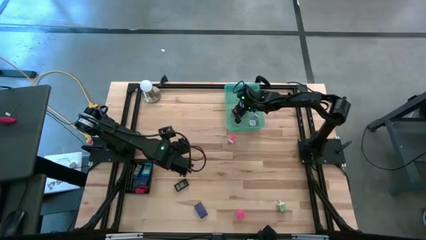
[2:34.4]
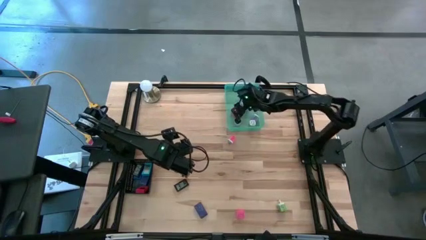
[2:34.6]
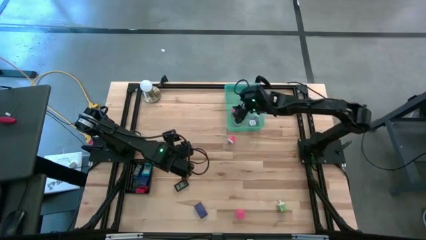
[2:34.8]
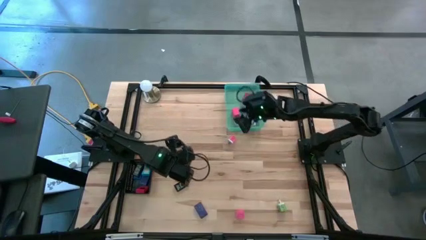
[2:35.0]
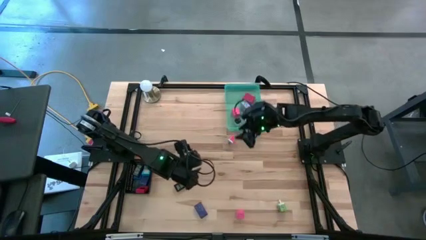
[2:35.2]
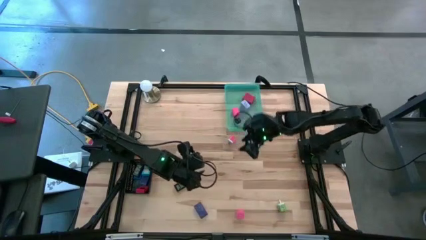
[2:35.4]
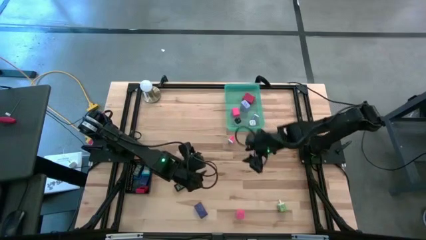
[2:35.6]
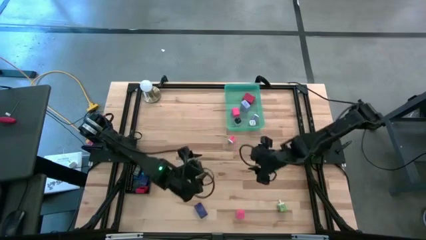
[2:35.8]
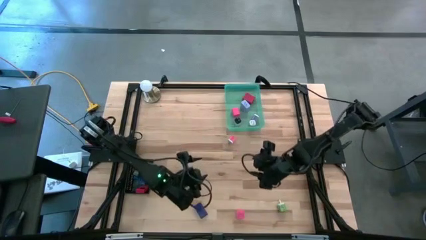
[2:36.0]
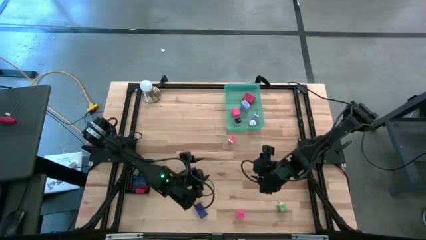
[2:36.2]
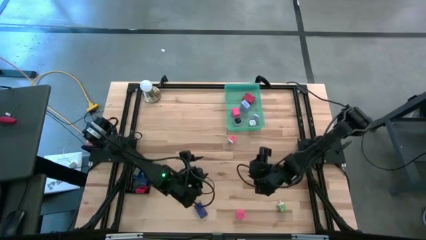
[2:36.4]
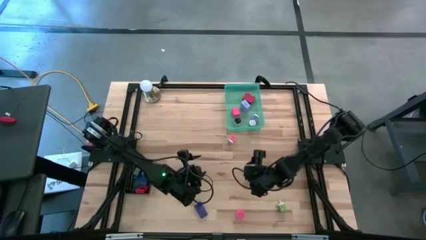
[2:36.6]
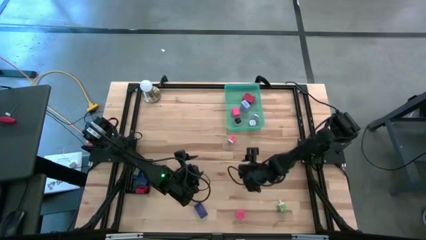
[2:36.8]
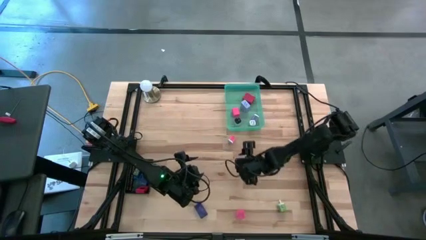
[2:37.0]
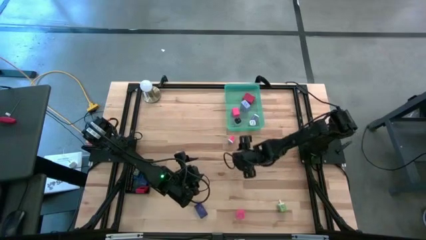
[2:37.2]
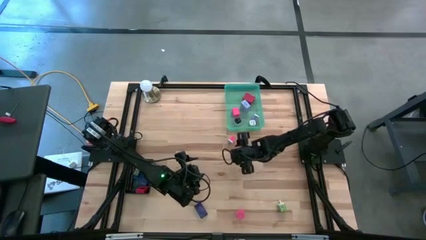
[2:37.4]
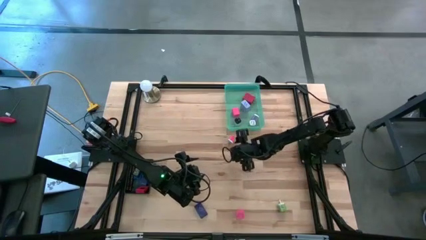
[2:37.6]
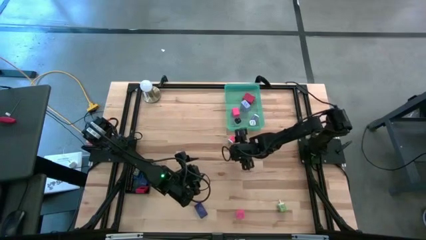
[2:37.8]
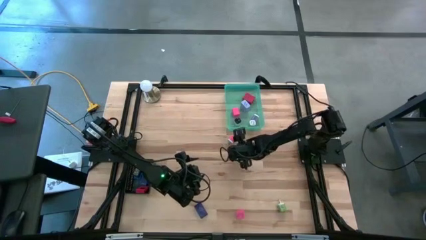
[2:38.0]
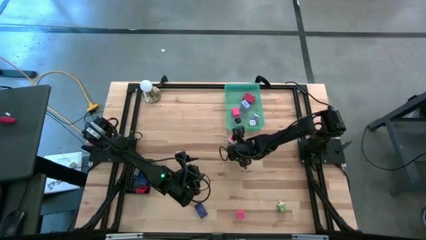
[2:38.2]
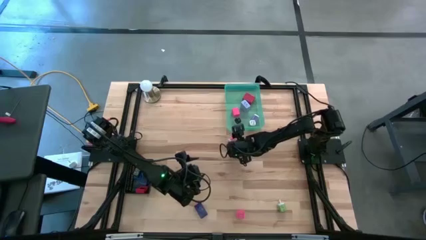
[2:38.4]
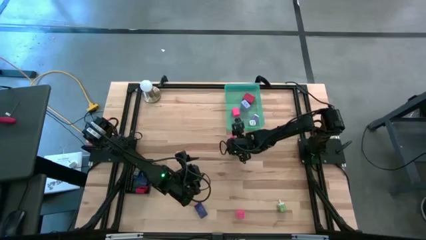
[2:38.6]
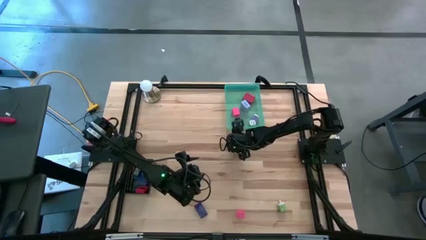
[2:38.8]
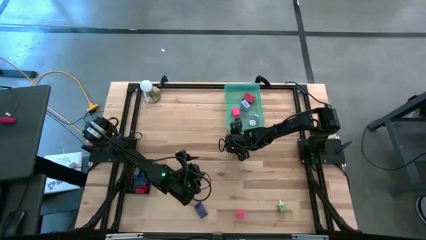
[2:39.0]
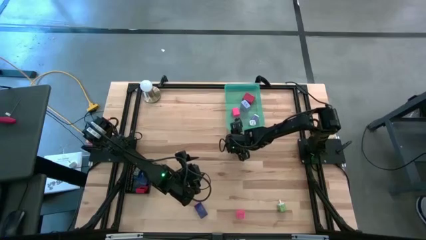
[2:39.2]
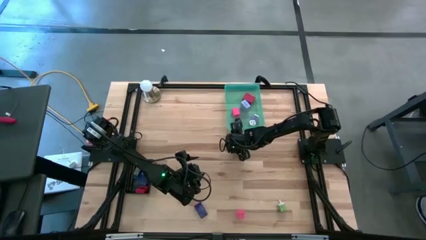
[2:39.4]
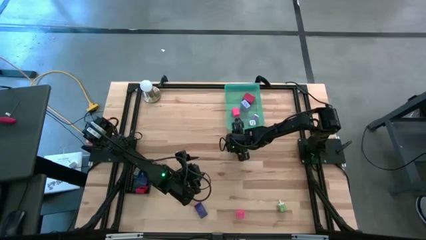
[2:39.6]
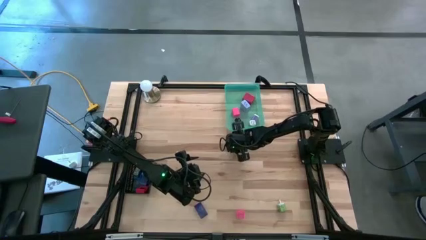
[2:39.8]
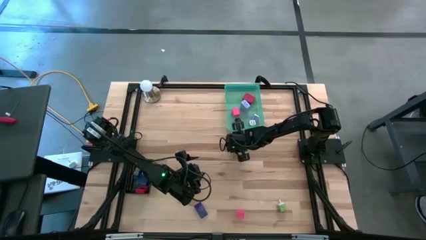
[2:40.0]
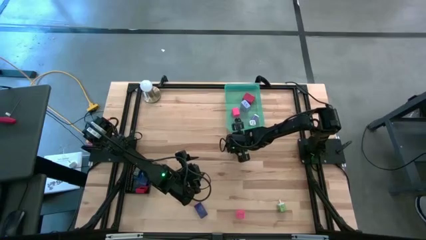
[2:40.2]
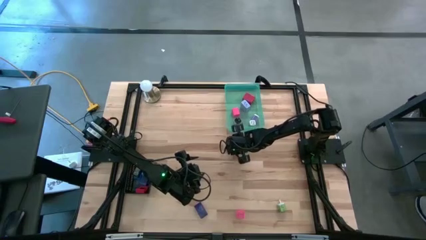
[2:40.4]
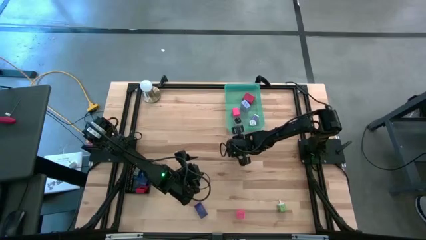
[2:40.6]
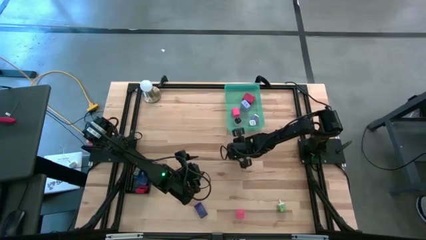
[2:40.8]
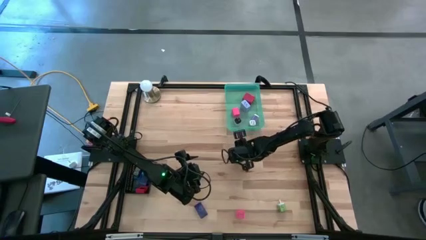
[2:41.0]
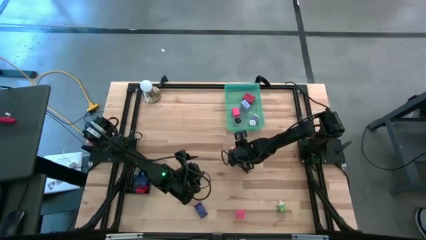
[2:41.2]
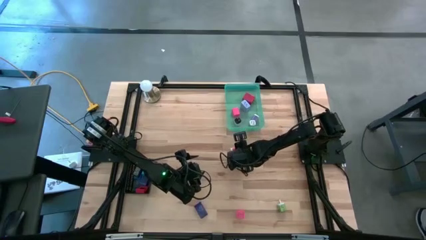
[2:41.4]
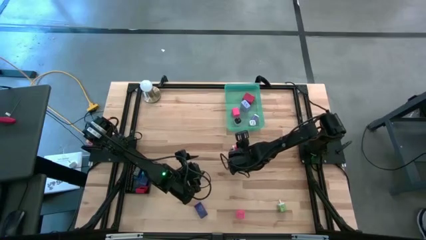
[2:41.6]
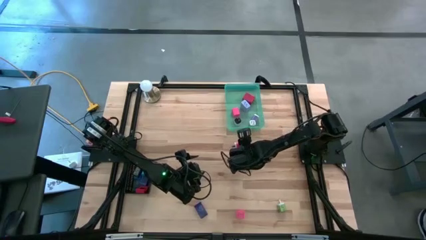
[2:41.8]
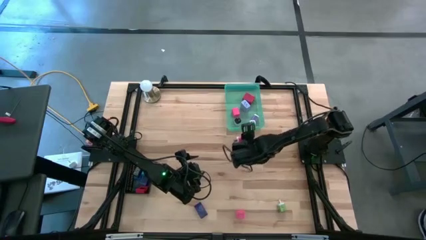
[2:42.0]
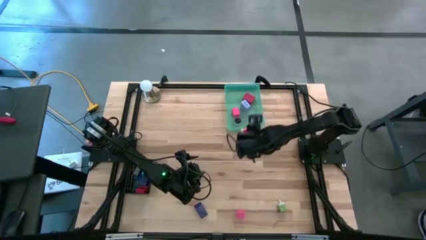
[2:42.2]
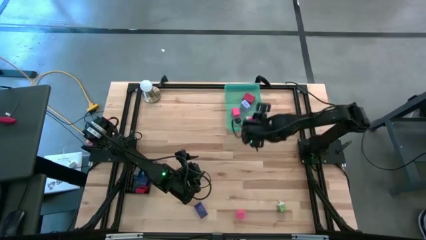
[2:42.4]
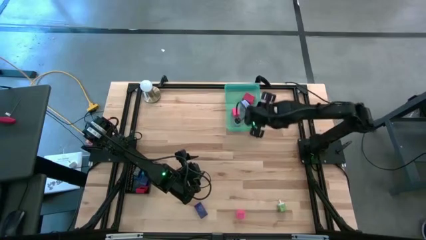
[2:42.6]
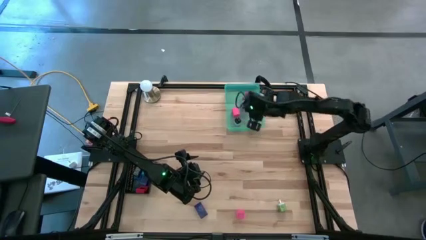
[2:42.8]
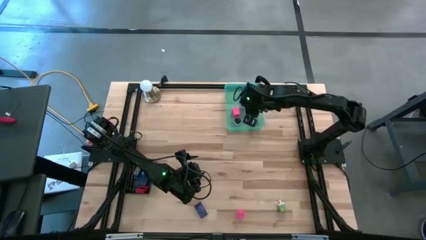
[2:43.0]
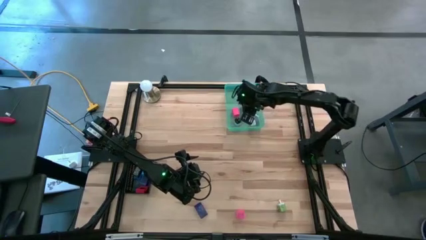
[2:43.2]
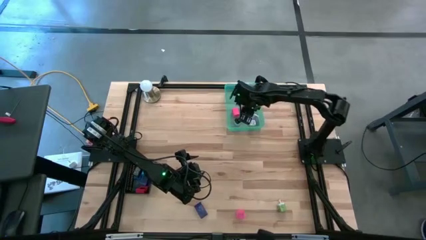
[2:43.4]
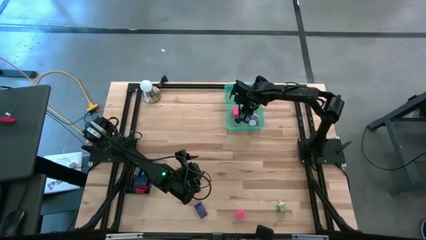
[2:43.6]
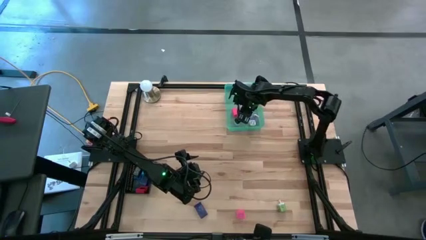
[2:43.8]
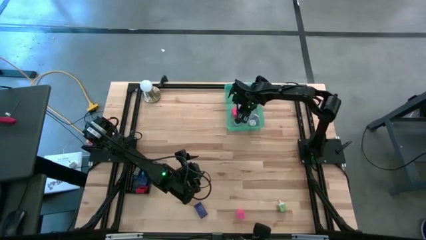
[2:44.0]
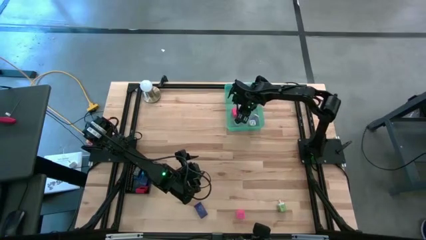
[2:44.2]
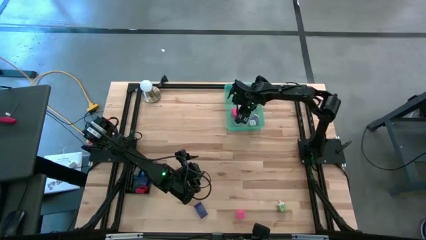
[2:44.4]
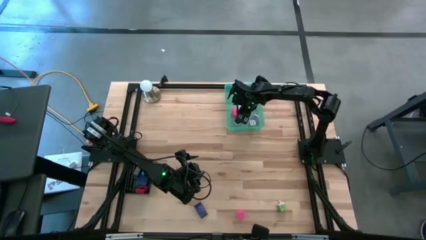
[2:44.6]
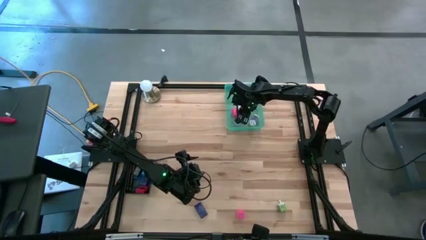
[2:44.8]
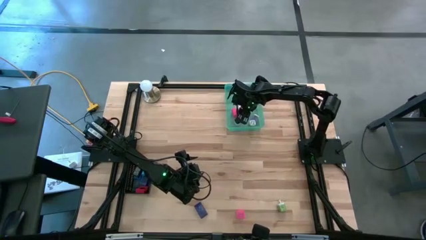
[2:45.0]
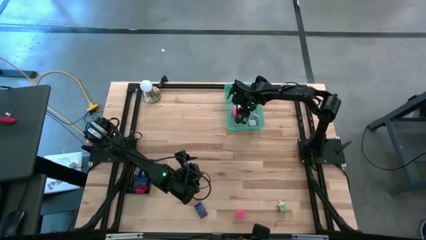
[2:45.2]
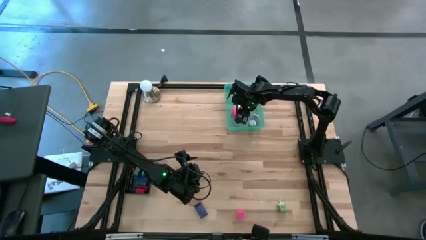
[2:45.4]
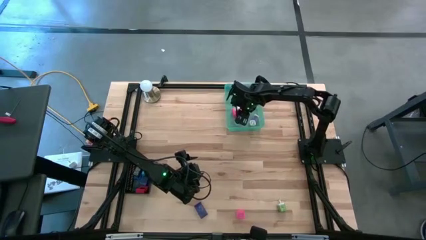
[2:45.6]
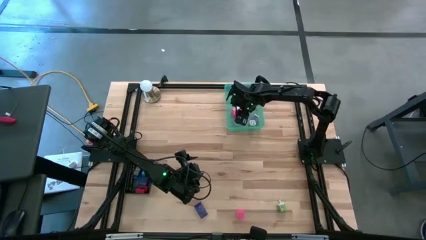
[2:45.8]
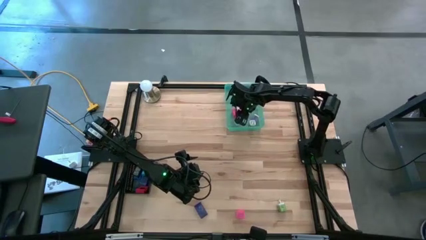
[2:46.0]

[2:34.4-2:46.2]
Task: Pick & Place Office items
Put the pink white charger adapter into the green bin
